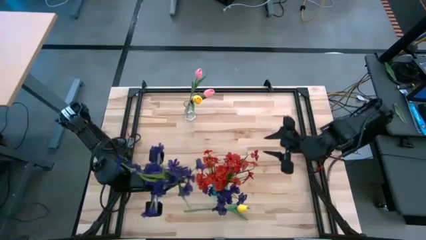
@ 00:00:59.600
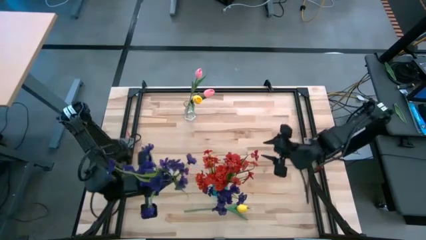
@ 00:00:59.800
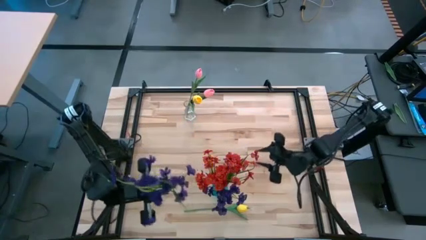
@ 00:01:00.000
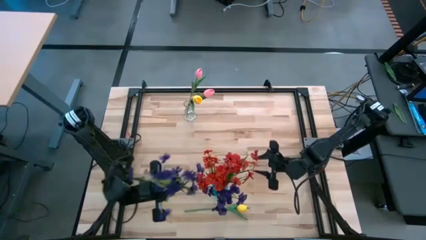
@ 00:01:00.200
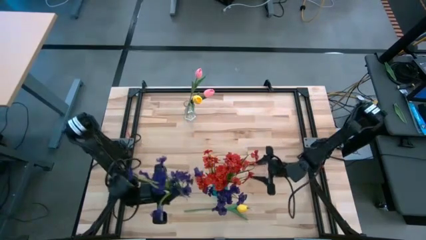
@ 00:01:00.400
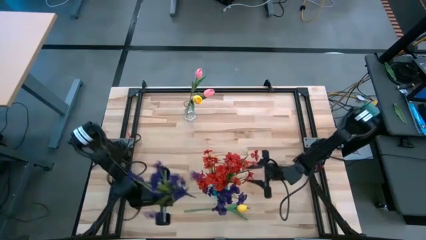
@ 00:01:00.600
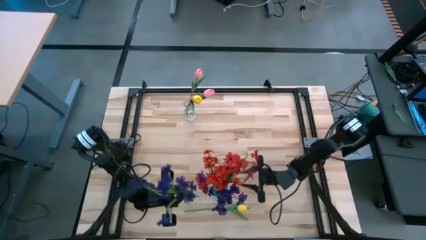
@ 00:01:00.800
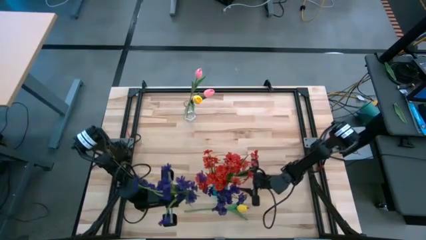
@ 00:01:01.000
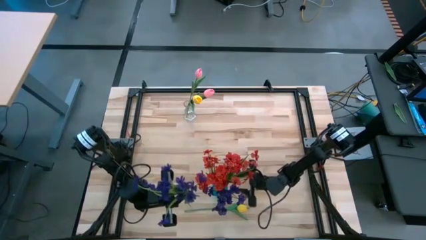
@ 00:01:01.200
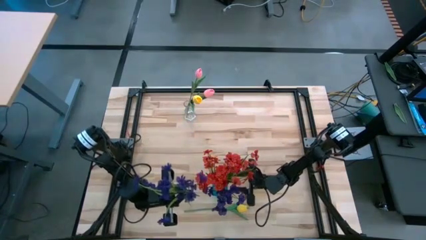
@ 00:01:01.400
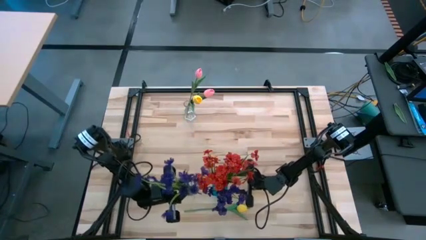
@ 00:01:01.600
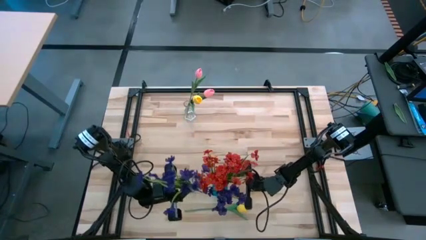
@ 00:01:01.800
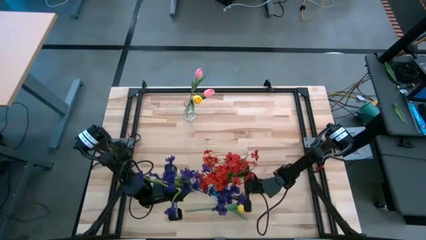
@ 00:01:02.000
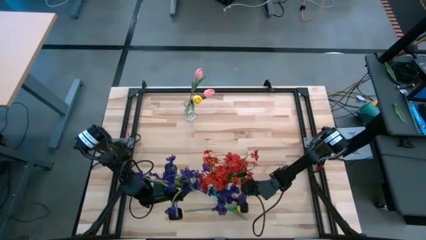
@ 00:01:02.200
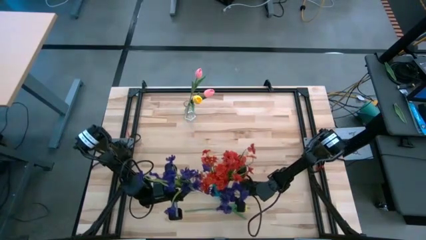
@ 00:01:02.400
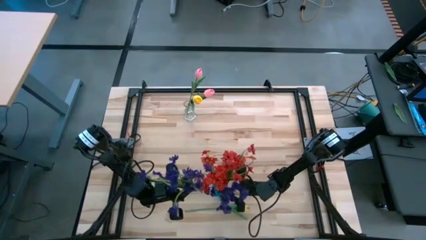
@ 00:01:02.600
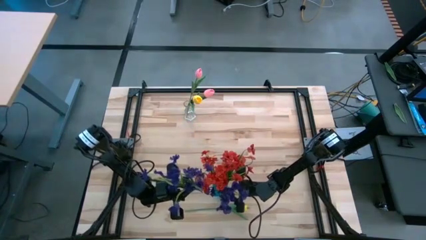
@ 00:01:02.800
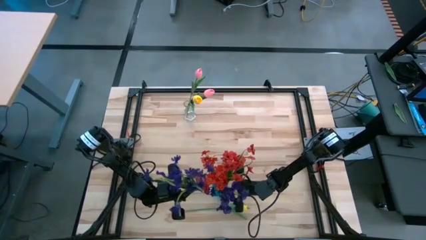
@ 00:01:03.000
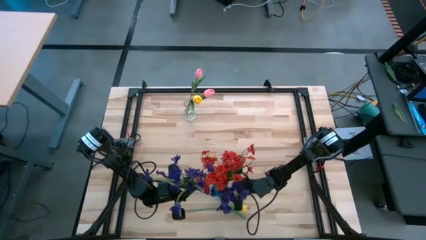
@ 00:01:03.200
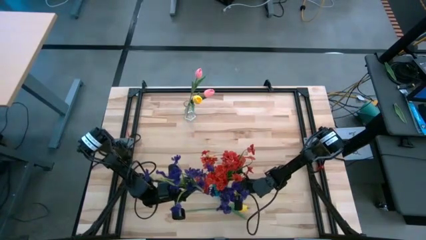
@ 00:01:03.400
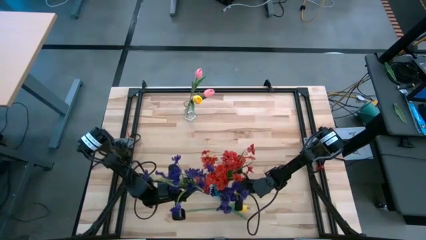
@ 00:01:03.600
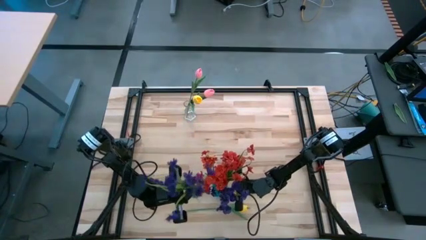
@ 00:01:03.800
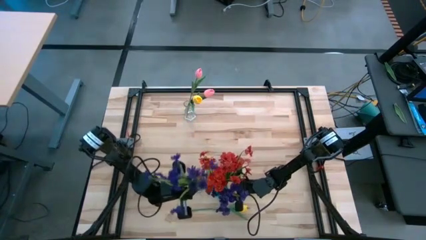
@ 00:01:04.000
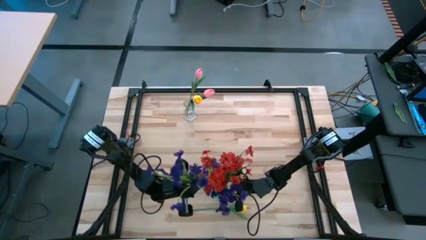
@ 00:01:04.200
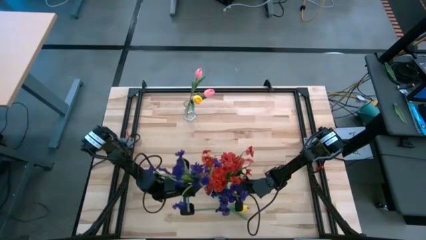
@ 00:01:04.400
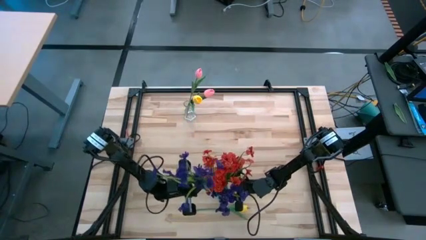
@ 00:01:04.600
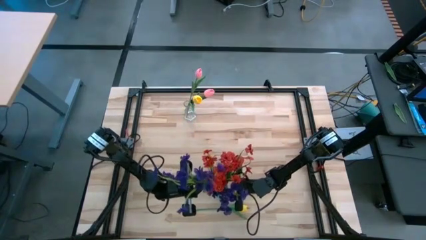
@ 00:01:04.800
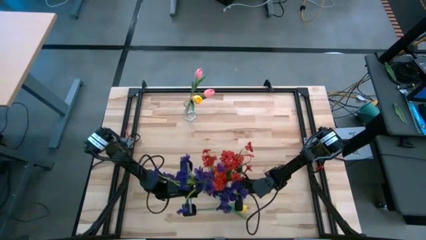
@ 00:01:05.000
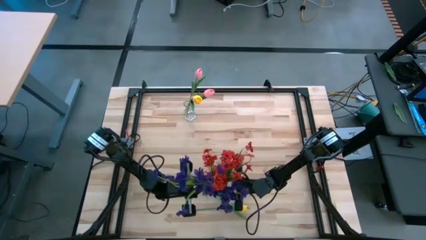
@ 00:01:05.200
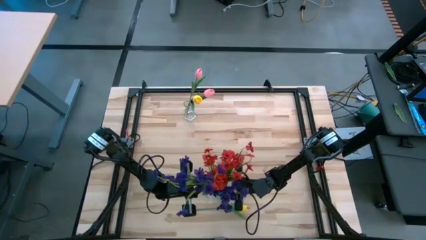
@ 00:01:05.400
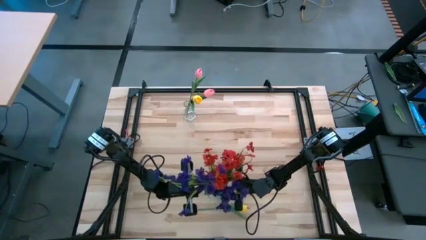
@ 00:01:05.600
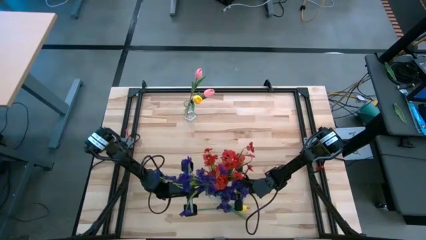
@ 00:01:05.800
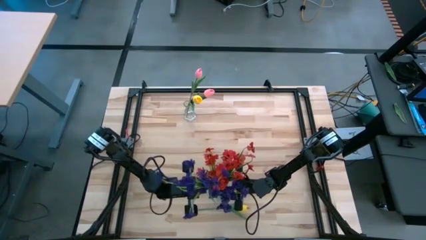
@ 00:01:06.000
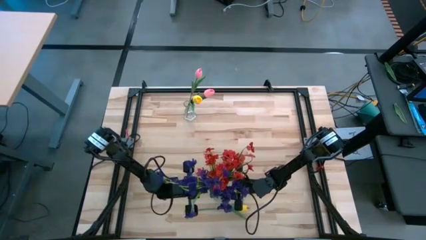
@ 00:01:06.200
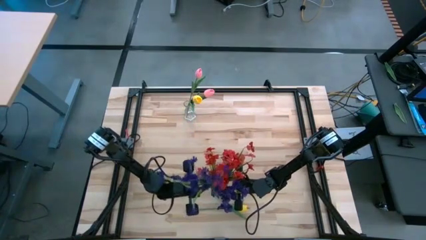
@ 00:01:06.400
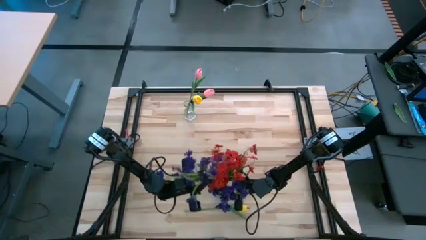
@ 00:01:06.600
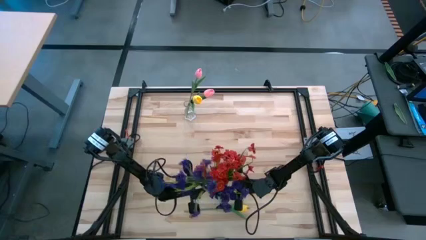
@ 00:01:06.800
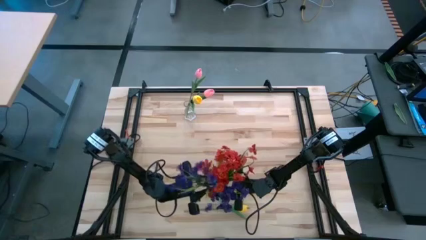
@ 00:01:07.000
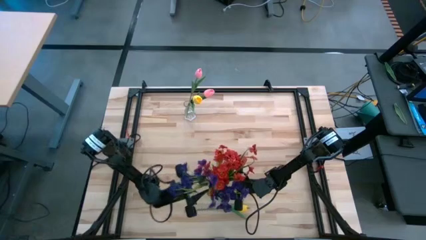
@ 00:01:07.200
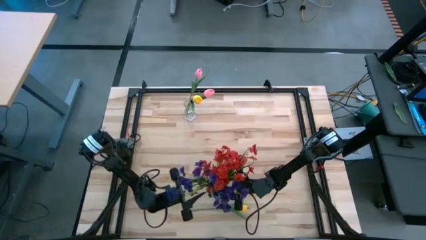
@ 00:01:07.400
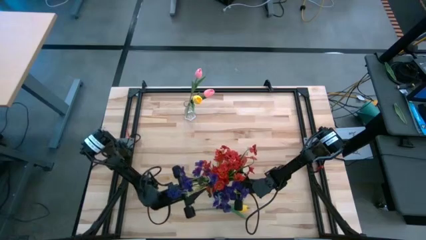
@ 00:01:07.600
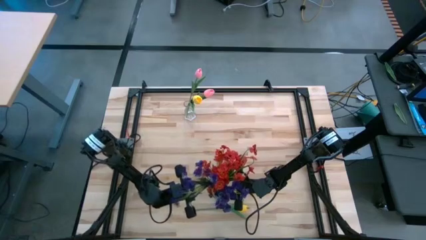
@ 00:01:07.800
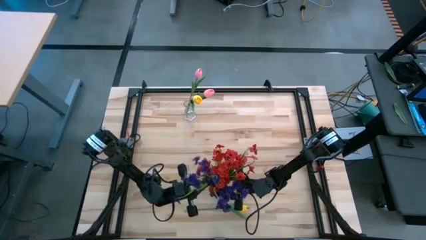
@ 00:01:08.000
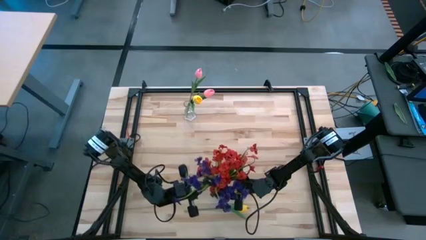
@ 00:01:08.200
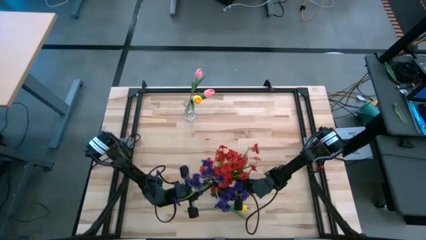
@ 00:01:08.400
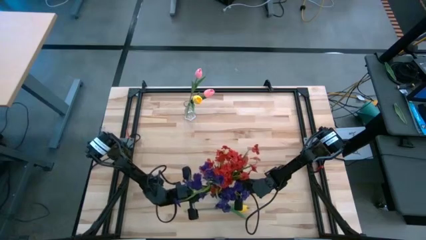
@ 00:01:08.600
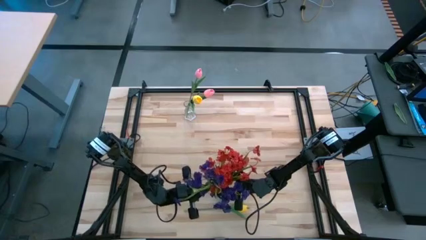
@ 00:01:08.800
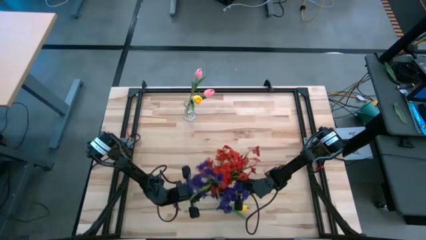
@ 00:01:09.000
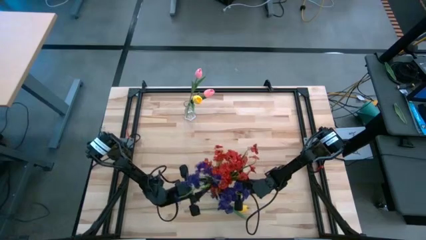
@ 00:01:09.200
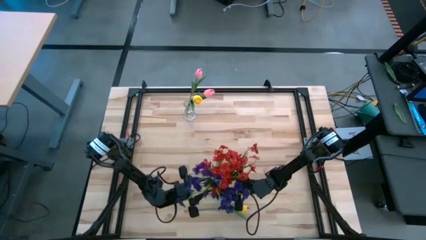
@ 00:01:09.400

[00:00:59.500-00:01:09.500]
Task: Sort flowers into vase by color
Put the violet flowers into the blue vase
